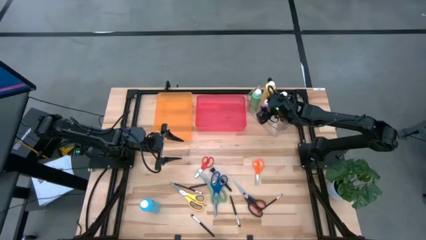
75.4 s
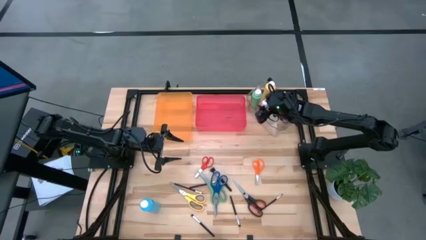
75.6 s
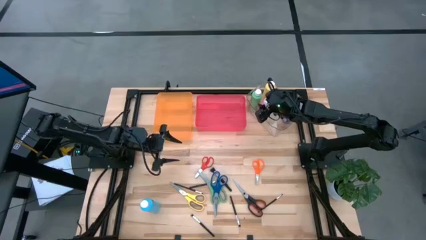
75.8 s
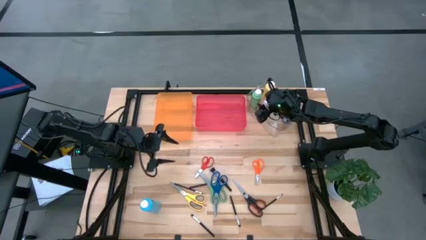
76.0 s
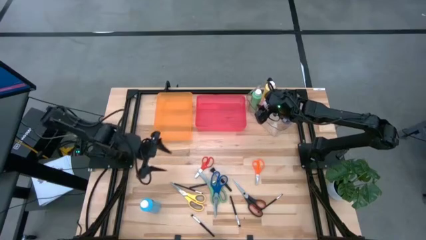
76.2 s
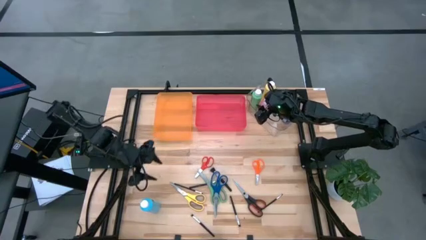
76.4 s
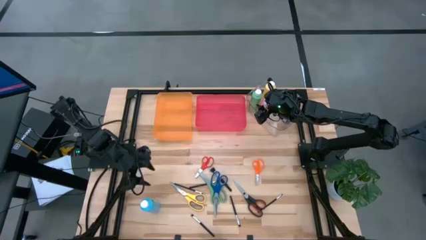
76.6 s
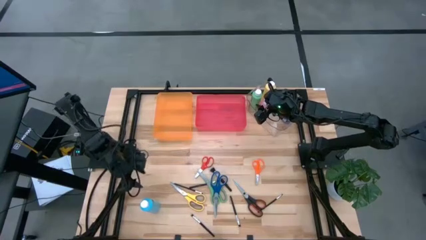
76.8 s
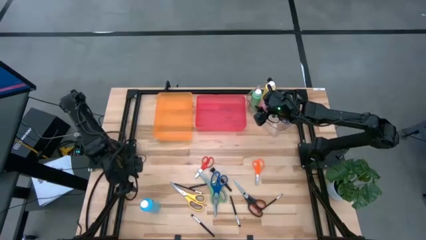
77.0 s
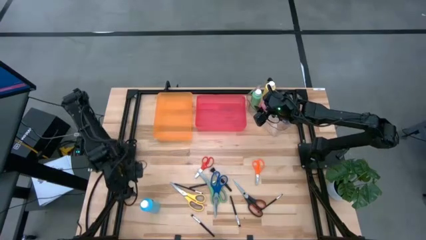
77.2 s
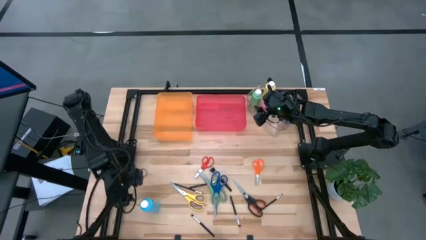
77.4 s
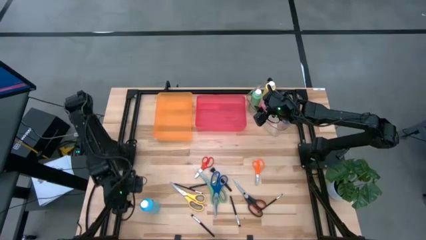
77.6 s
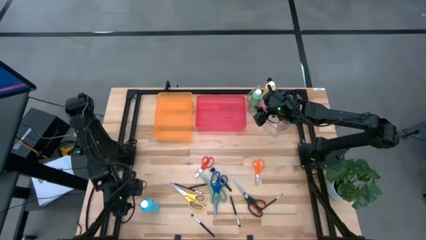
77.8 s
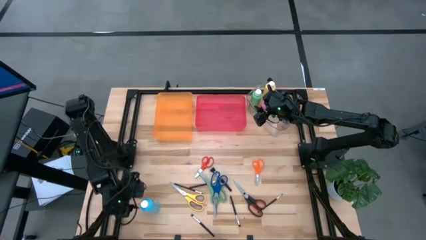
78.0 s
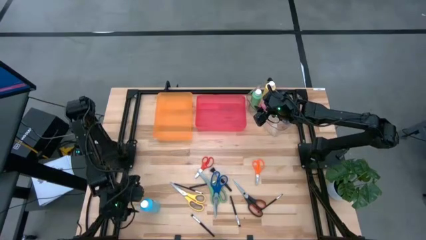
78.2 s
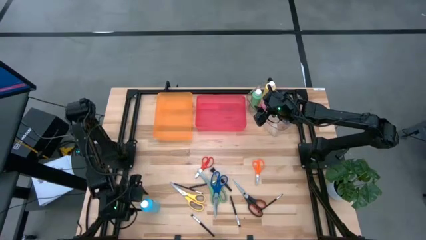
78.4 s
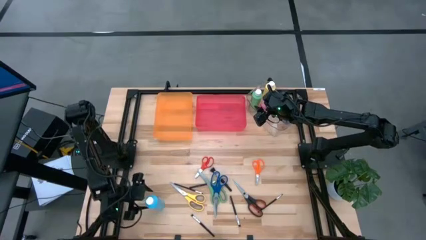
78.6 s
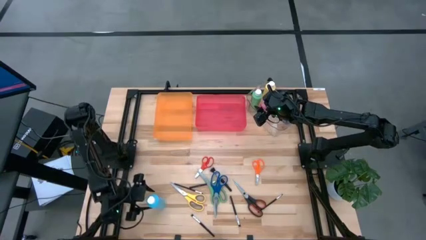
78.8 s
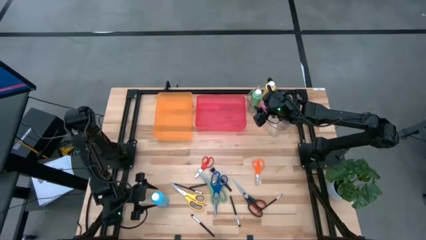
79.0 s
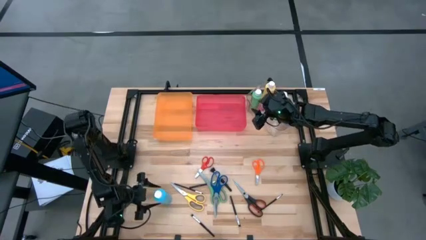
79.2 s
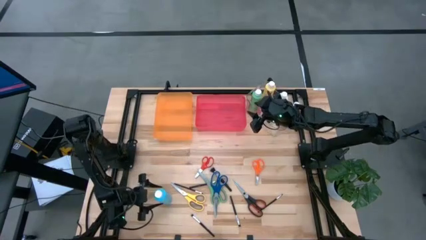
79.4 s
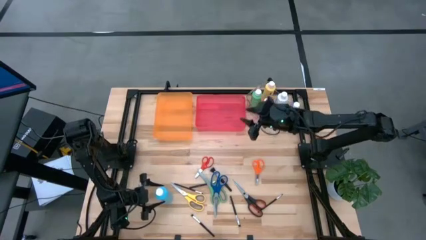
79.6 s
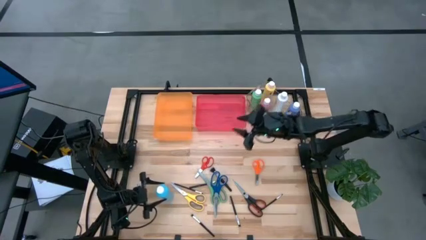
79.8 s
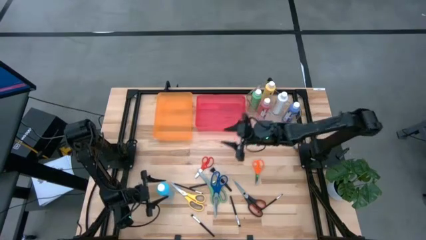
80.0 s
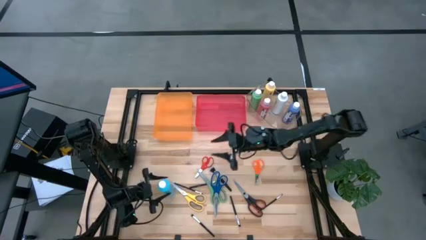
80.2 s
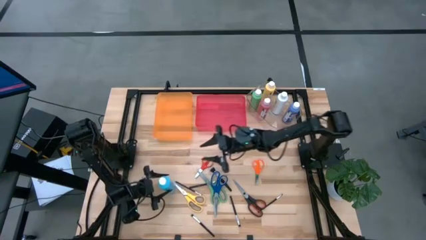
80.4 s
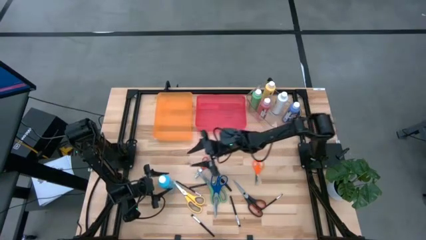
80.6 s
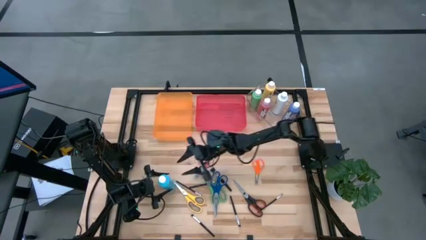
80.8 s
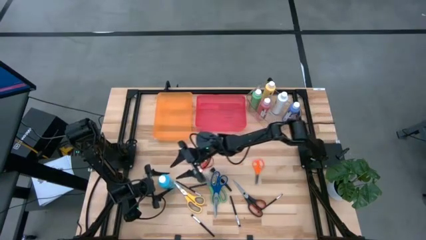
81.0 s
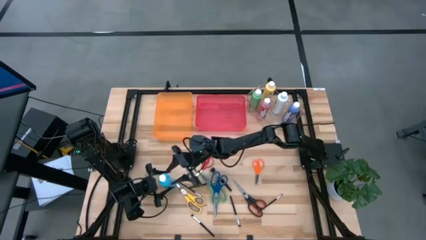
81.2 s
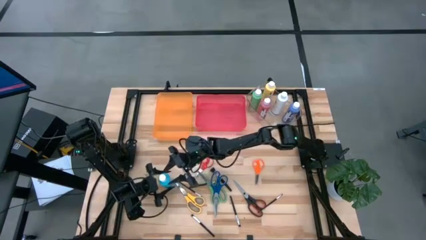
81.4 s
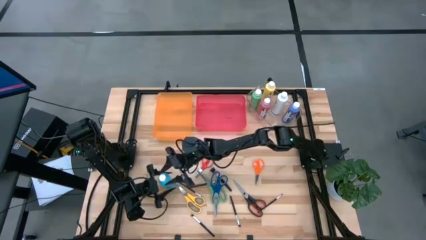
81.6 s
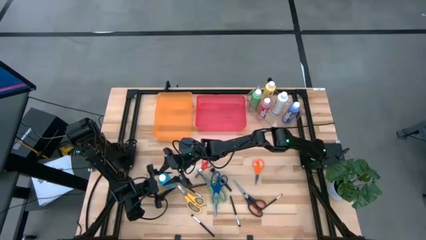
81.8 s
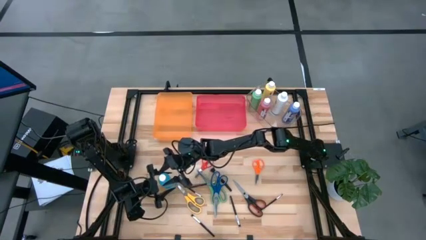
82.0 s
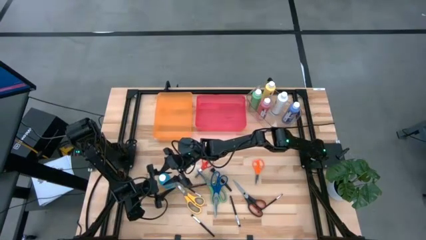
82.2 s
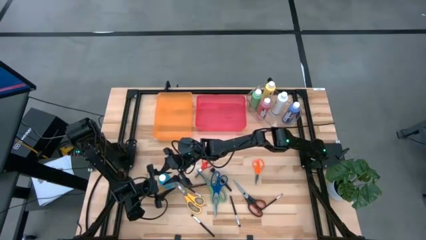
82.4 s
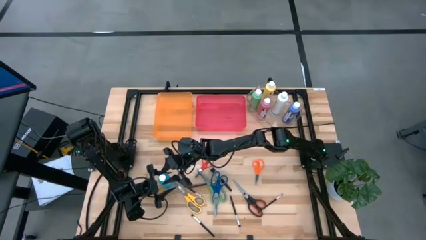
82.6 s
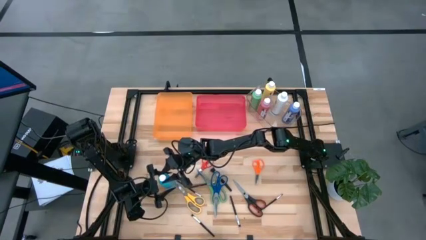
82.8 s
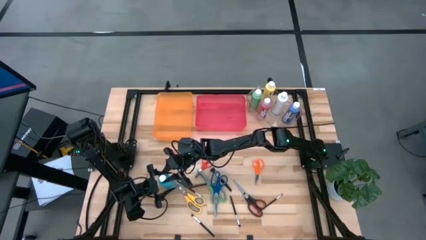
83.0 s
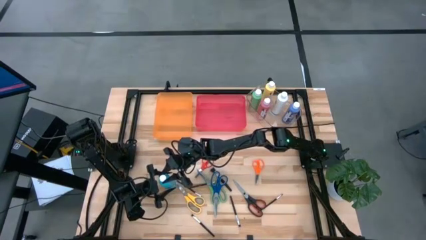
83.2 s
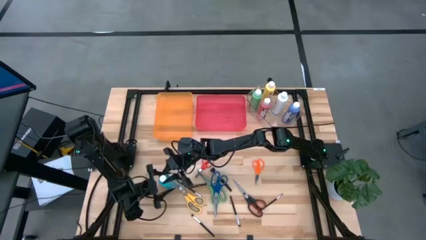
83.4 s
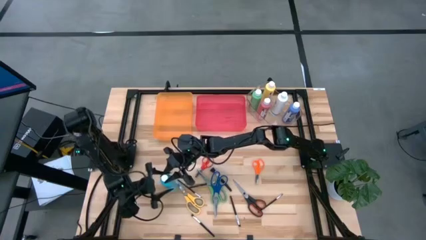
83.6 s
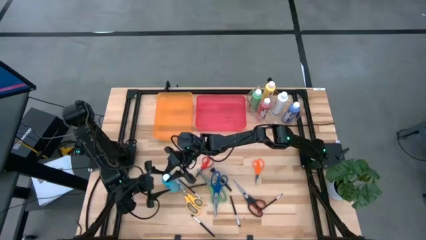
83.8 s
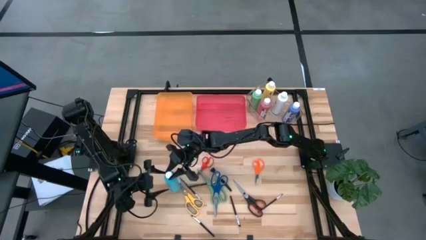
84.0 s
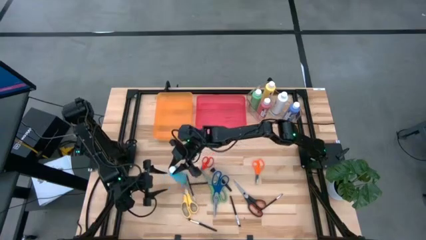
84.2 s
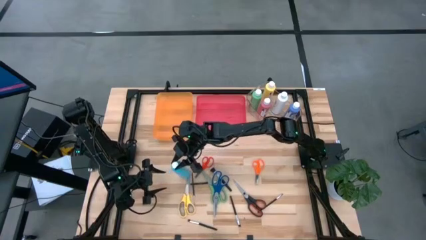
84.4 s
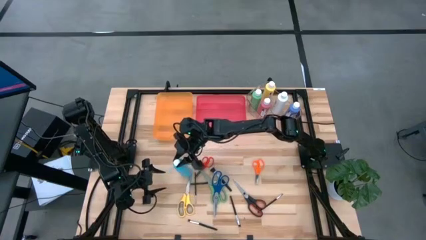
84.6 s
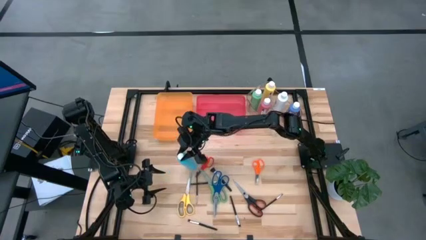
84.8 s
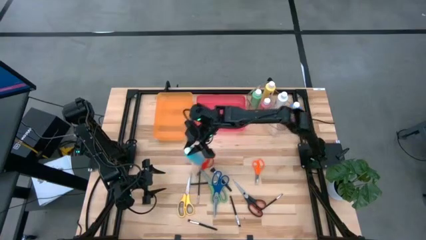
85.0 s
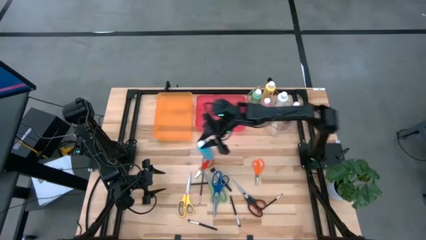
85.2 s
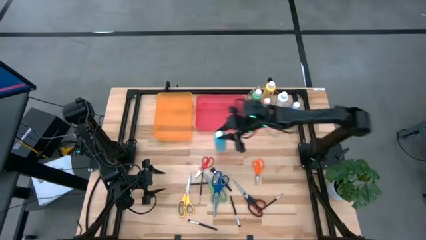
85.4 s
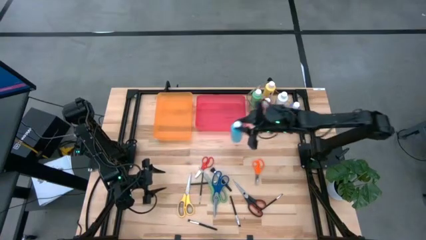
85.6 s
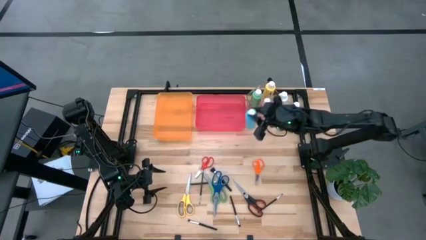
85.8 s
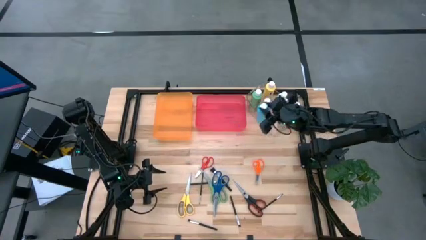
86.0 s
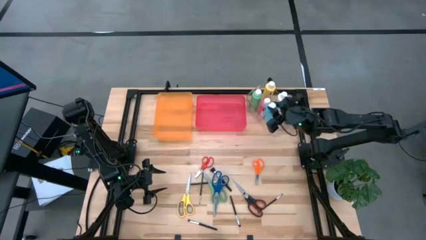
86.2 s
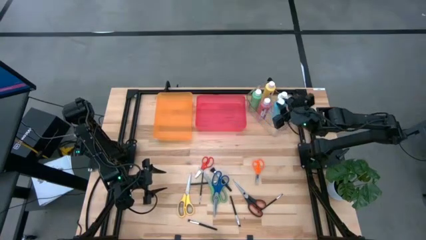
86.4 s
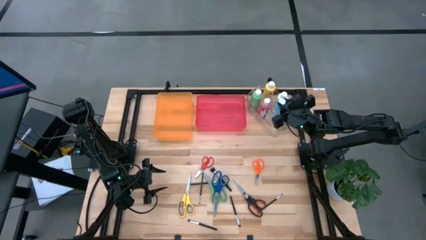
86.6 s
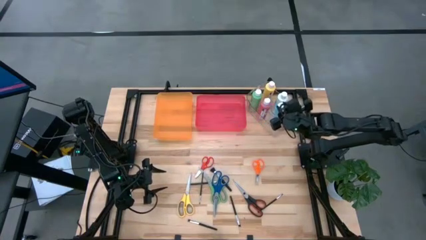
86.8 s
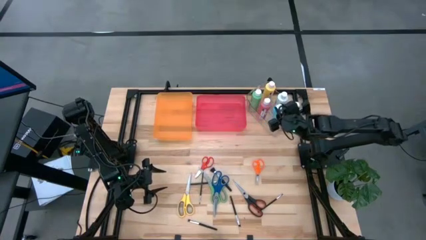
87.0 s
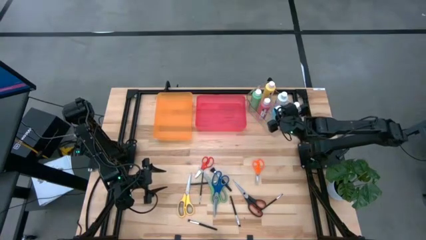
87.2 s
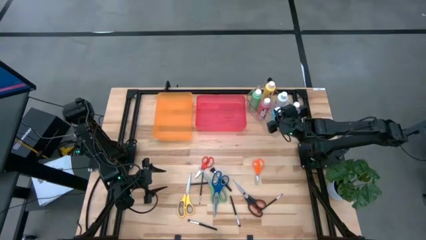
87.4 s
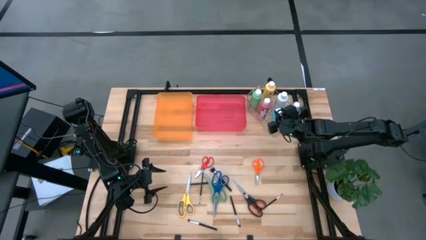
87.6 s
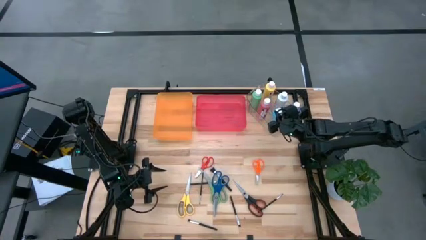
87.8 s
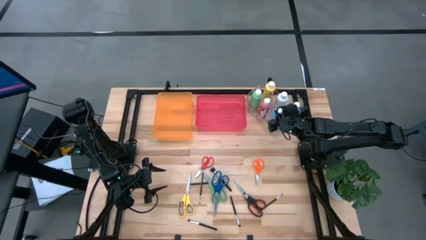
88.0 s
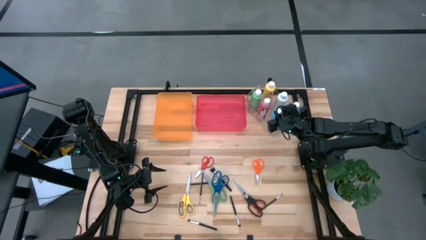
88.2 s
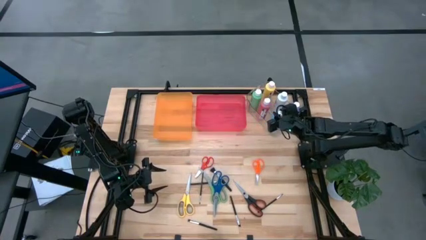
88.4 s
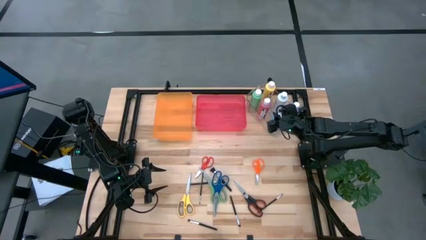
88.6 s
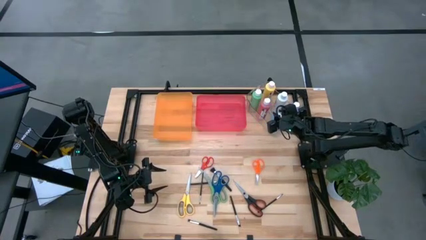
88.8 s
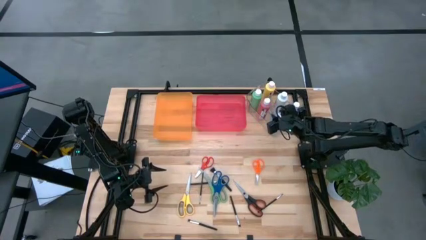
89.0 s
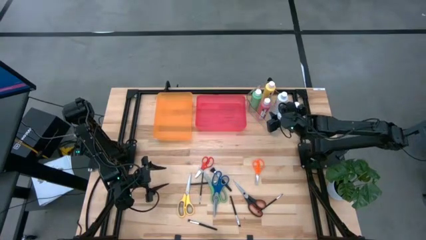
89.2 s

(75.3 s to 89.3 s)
Task: Pick & Place Paint Supplies
Put the blue paint bottle into the transparent bin

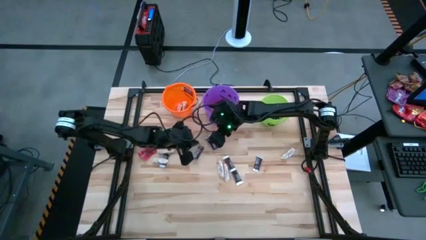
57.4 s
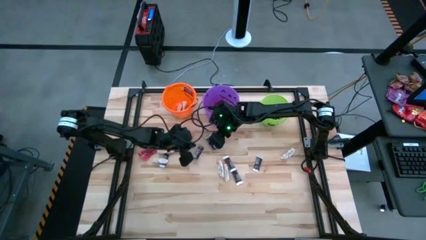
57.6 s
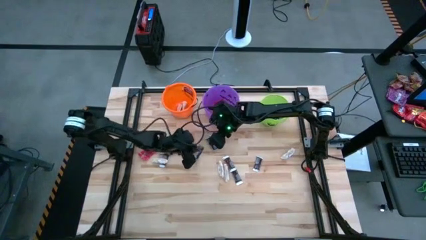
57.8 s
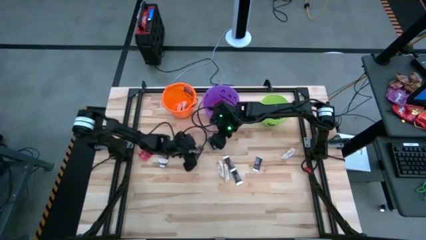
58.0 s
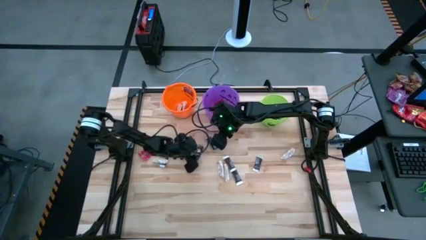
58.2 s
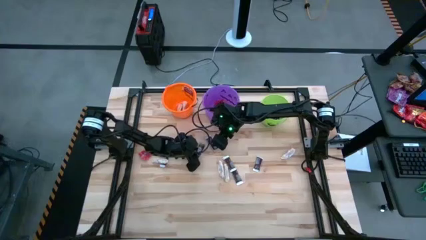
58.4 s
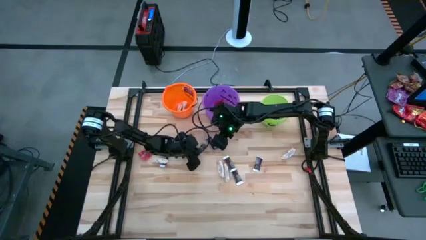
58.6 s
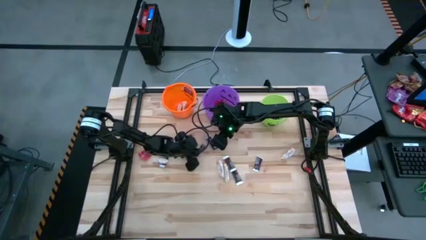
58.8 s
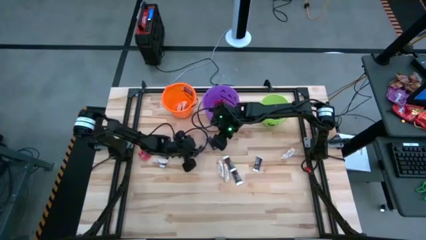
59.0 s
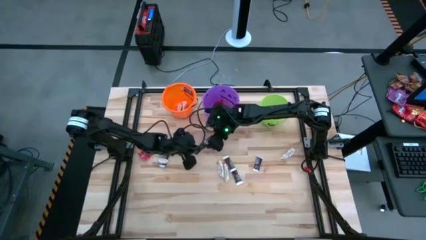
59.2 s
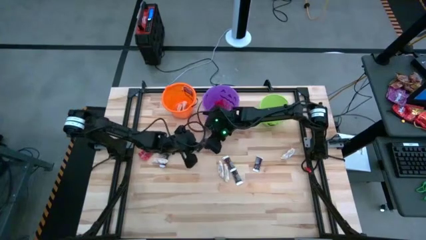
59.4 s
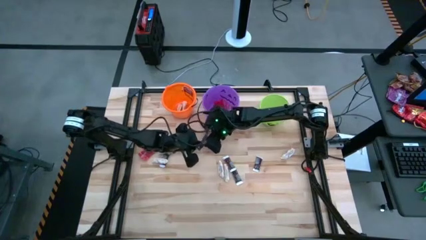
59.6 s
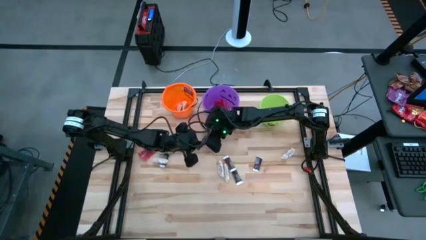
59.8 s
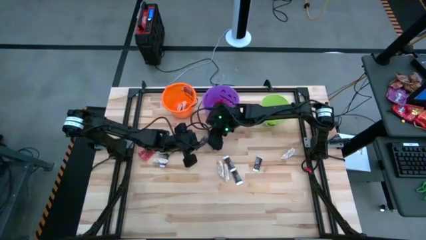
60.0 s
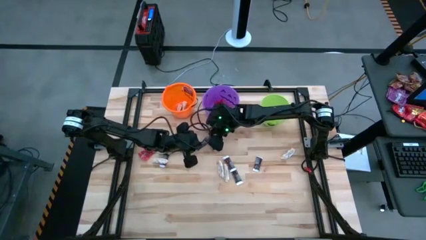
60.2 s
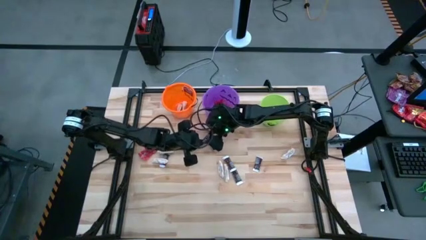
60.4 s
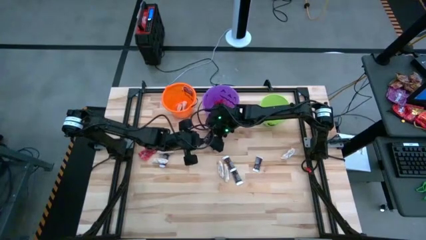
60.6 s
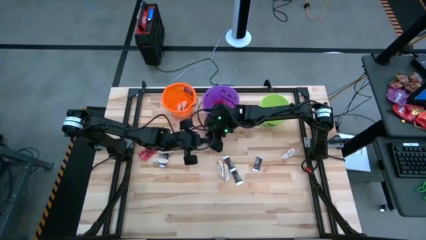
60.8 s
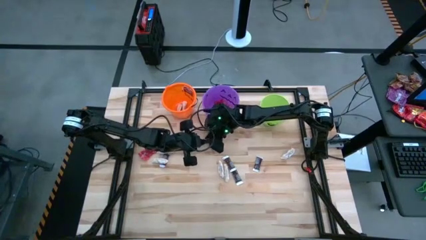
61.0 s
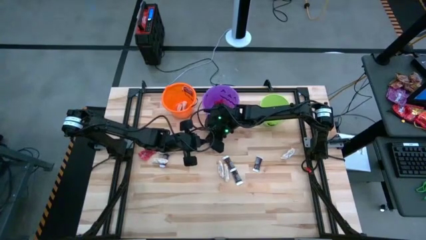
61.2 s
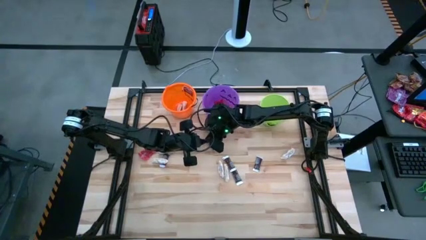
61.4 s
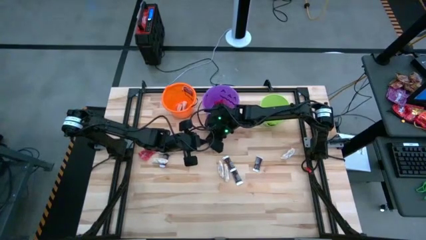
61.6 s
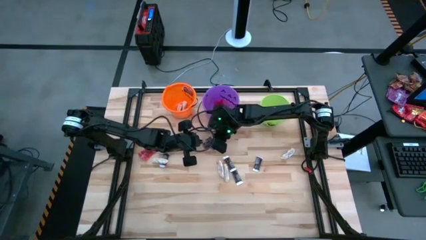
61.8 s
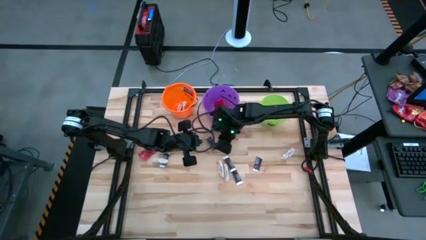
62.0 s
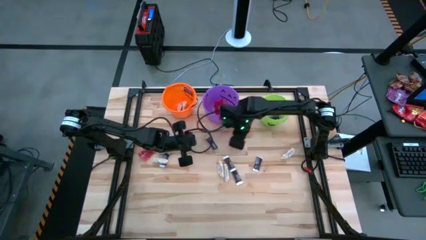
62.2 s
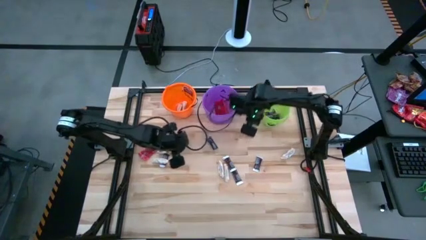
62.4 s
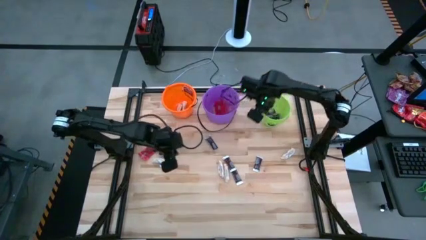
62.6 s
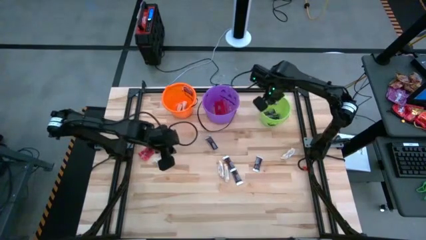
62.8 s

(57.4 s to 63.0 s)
Task: Sort candy by brand, put in halloween buckets
Put the brown chocolate bar into the green bucket
